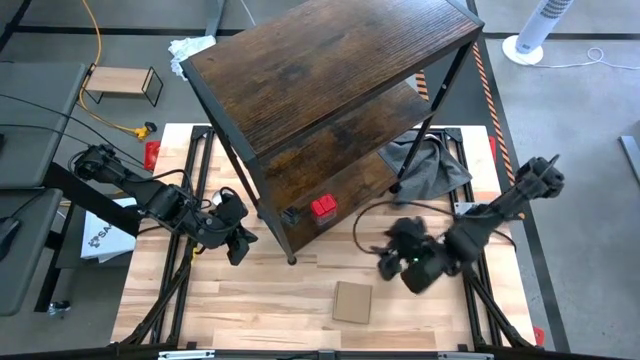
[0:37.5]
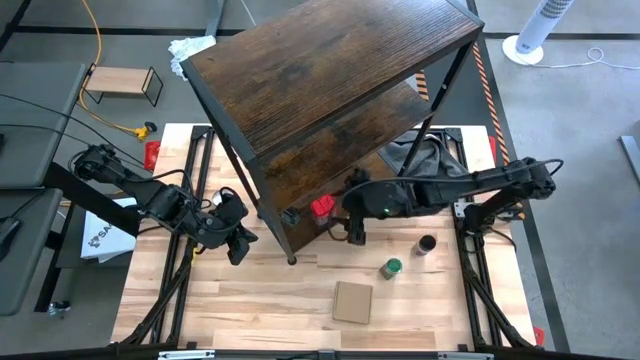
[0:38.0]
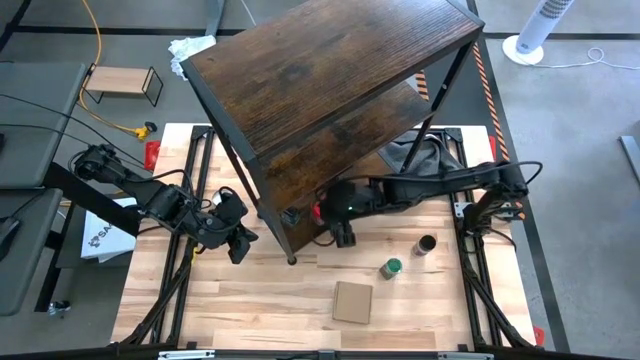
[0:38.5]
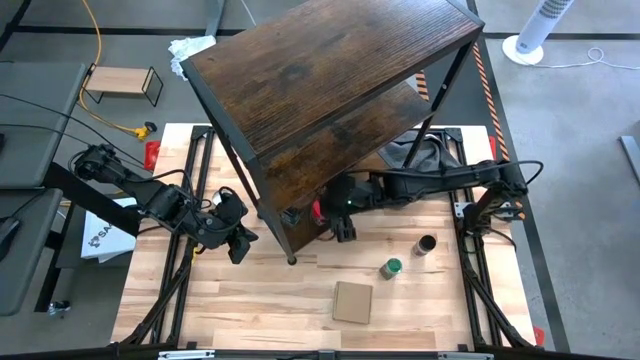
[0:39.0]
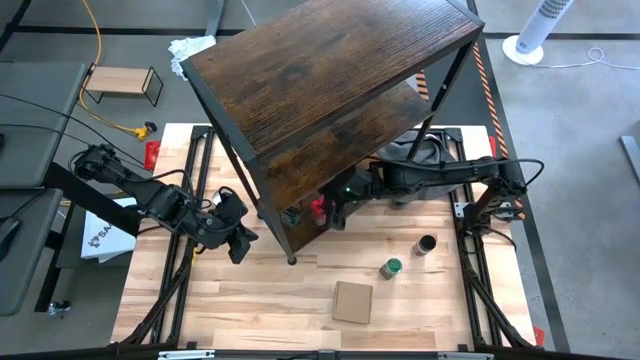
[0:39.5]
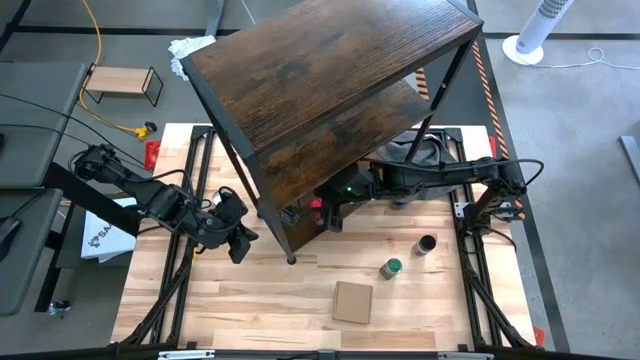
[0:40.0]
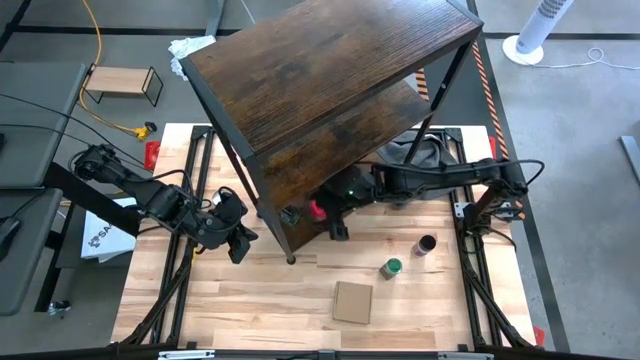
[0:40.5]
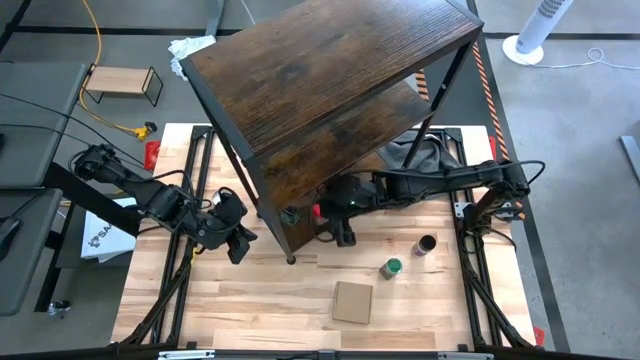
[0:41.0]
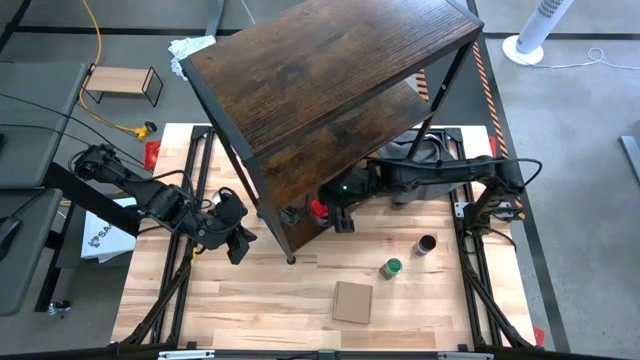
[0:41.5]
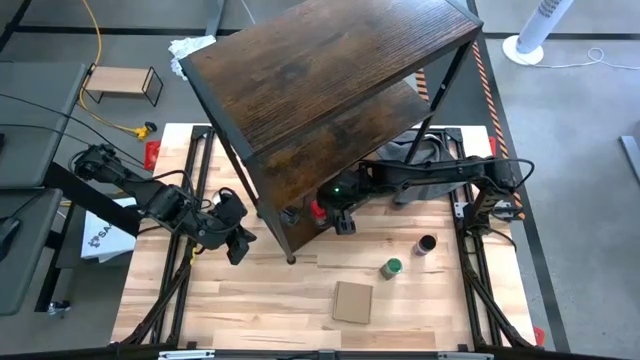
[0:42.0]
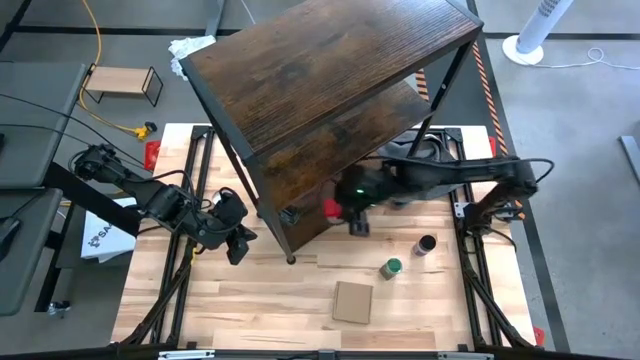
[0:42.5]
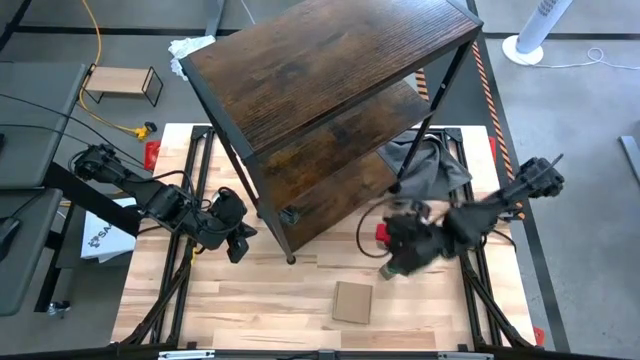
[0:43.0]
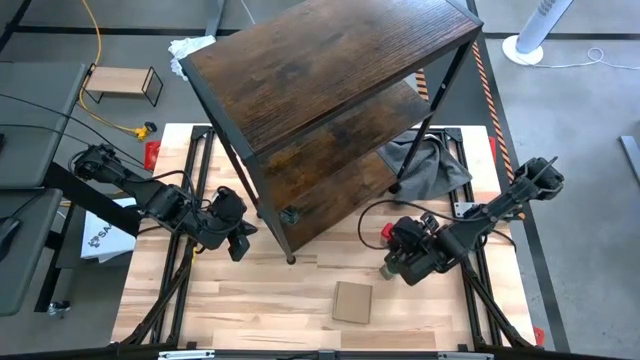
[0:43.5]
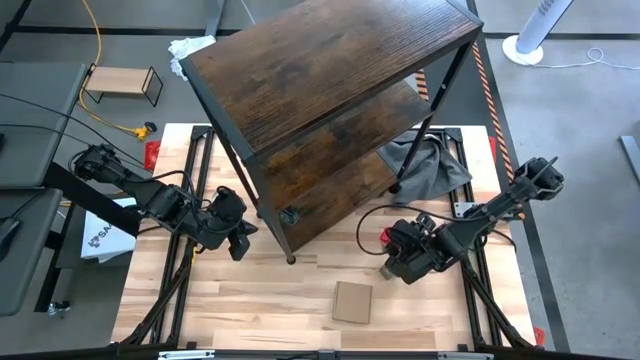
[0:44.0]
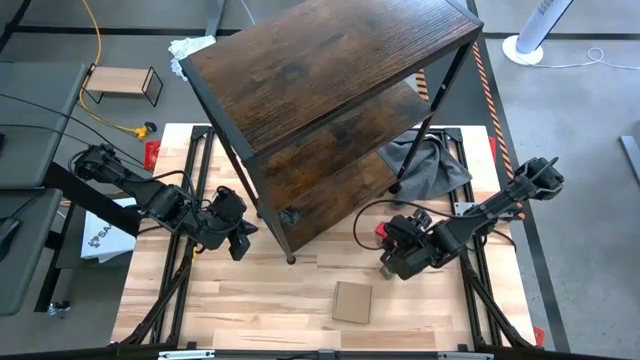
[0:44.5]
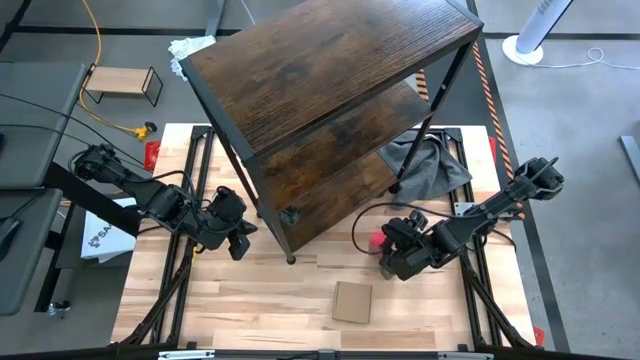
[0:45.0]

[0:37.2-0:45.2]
Task: Shelf spices
Remove the red seasoning can from the shelf

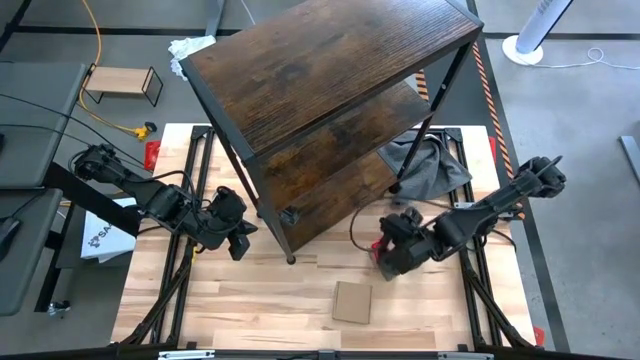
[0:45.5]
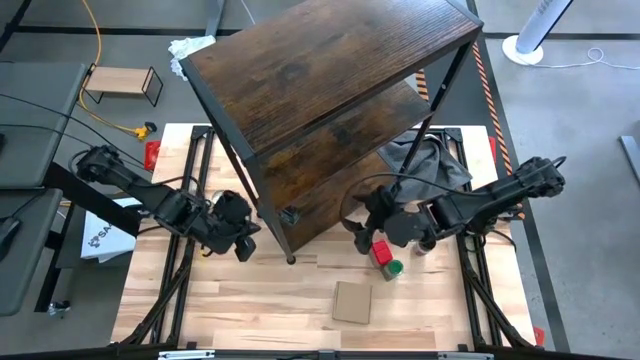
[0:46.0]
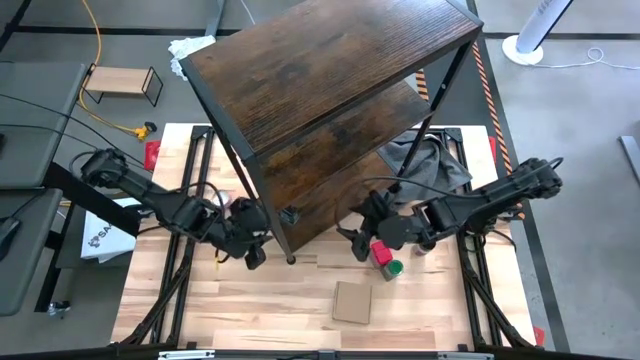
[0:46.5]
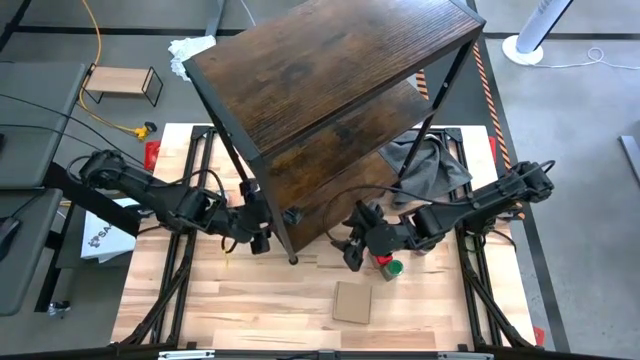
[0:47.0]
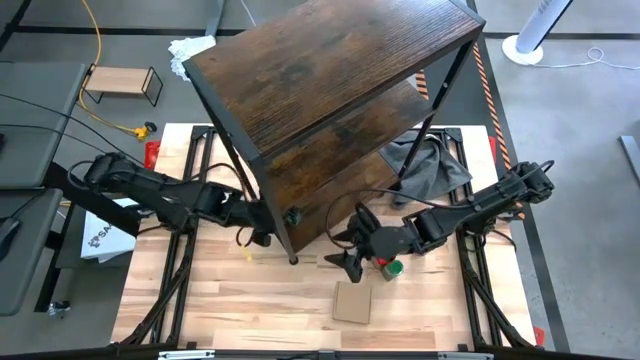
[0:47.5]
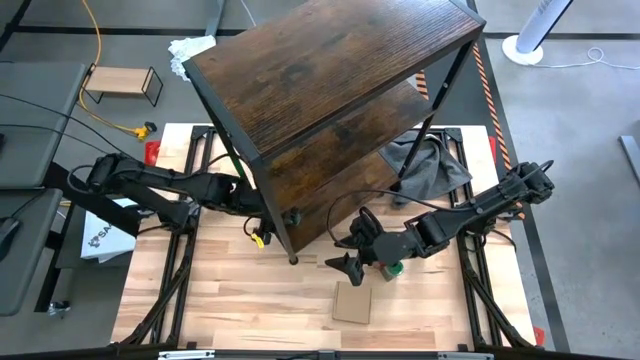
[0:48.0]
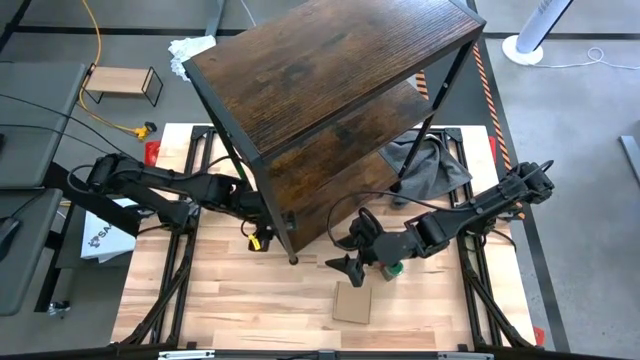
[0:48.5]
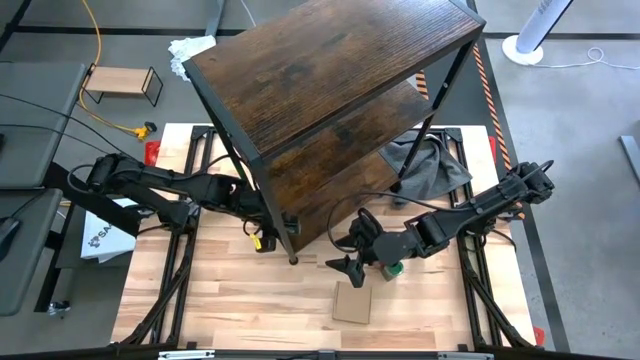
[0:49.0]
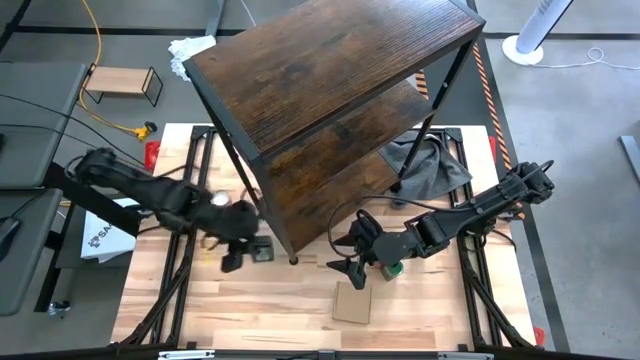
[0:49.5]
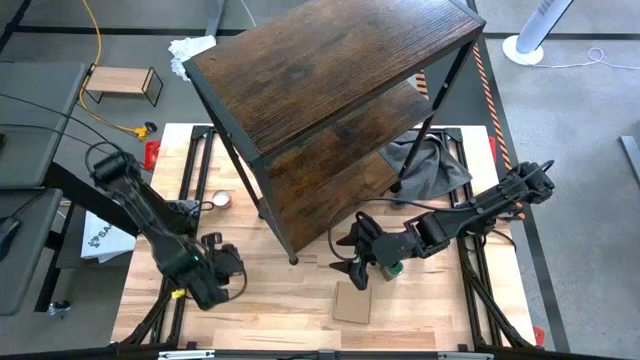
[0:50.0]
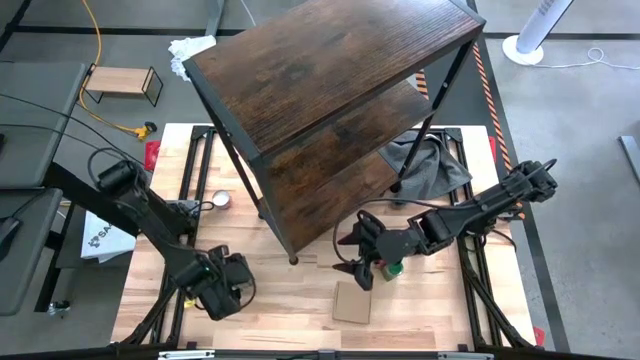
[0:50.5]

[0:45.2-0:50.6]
Remove the black seasoning can from the shelf

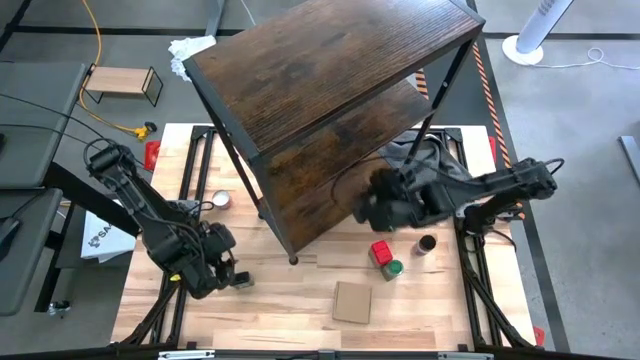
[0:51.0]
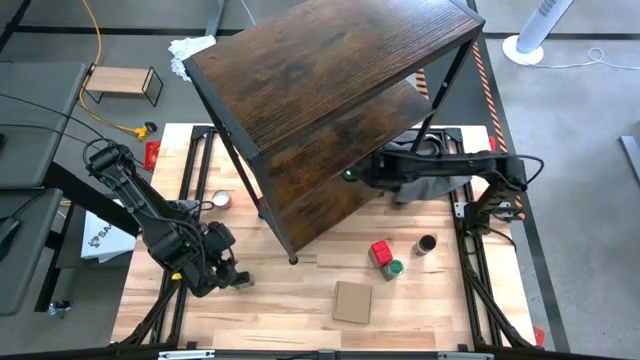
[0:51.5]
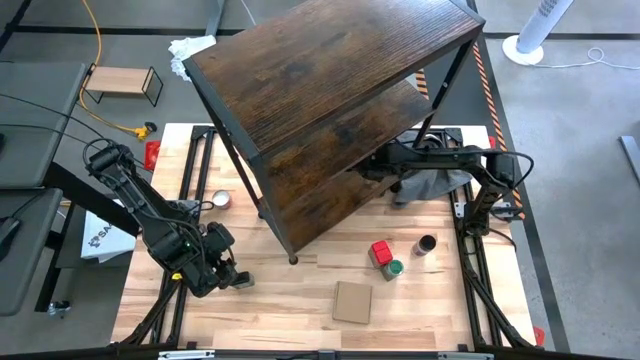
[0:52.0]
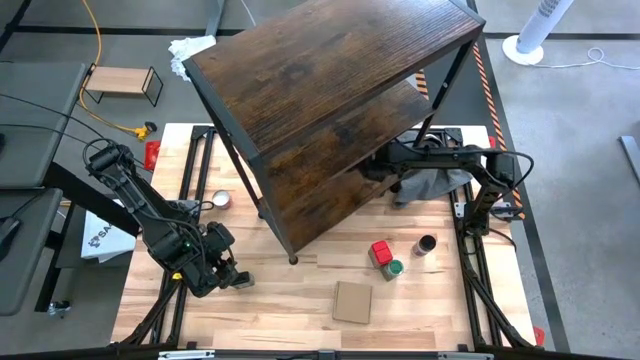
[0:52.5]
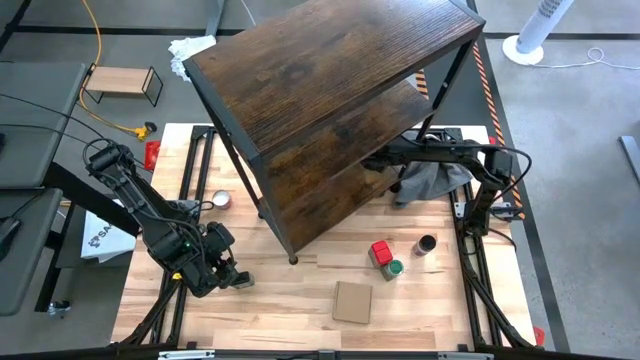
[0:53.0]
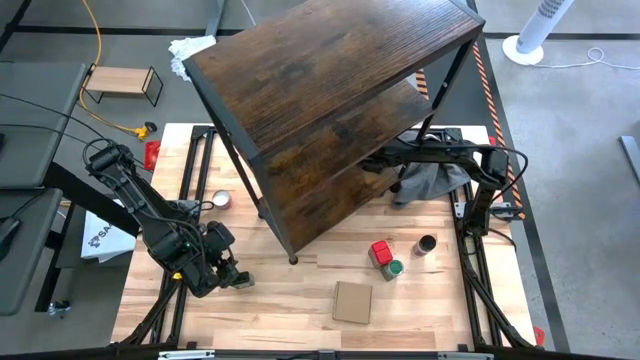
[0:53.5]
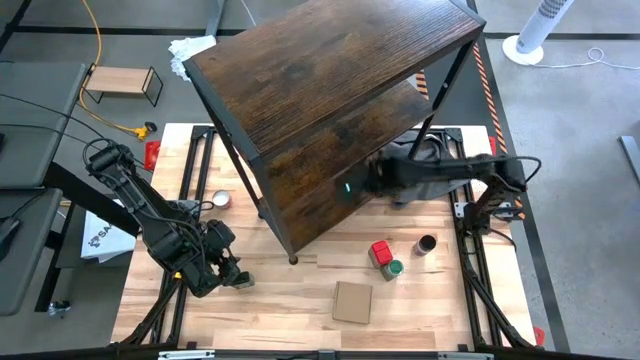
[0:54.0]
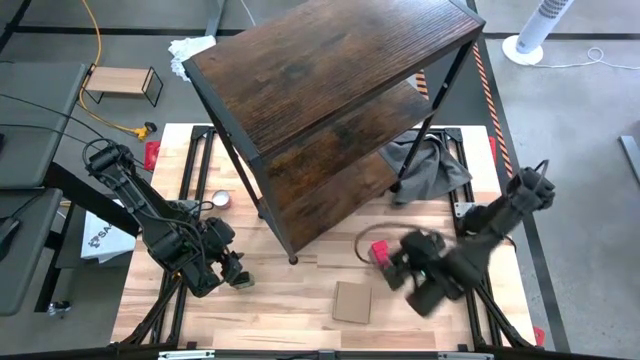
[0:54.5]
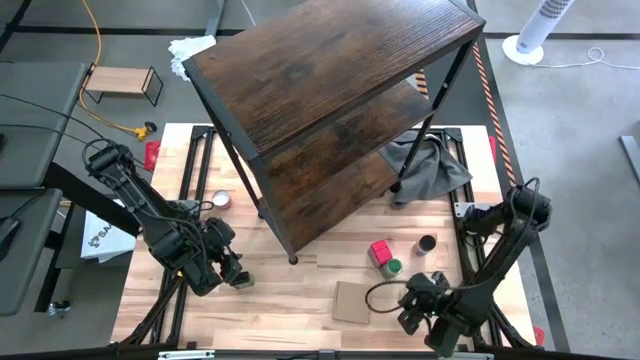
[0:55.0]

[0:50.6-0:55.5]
Remove the brown seasoning bottle from the shelf

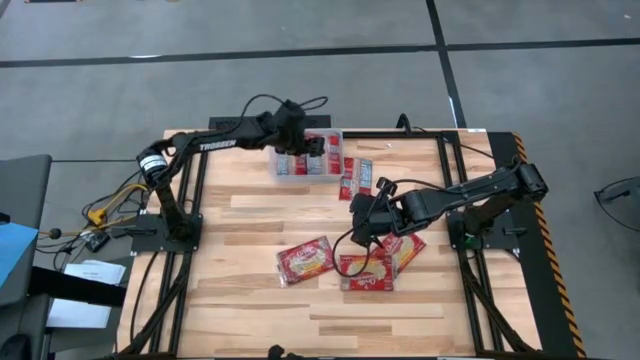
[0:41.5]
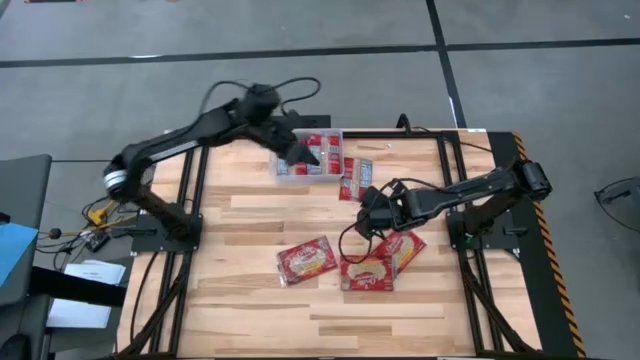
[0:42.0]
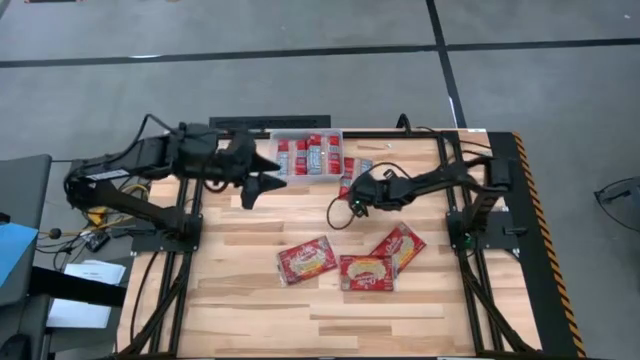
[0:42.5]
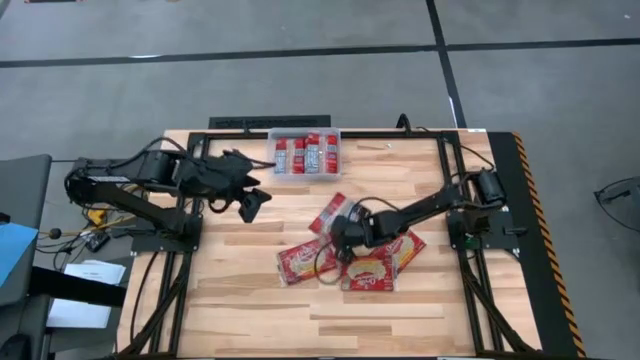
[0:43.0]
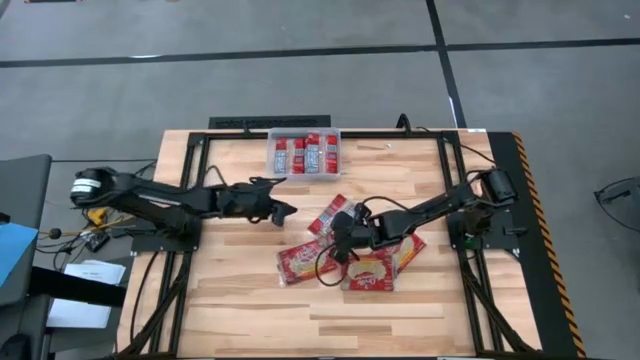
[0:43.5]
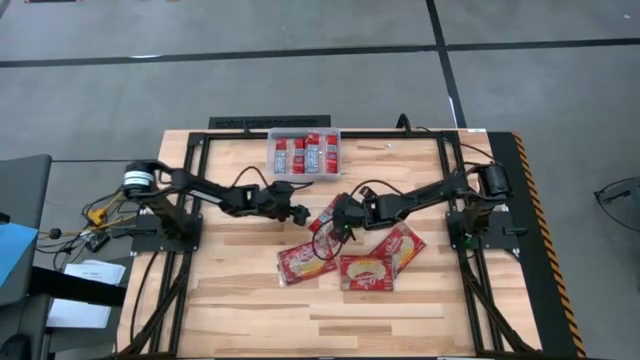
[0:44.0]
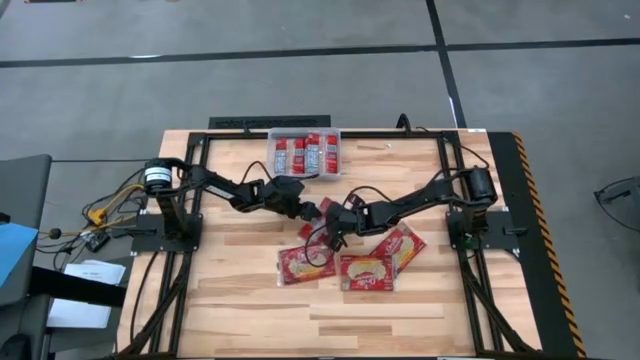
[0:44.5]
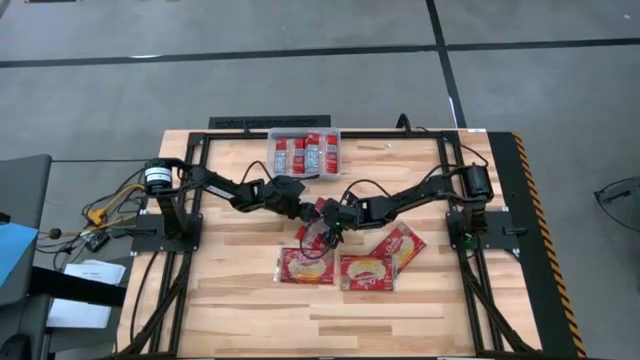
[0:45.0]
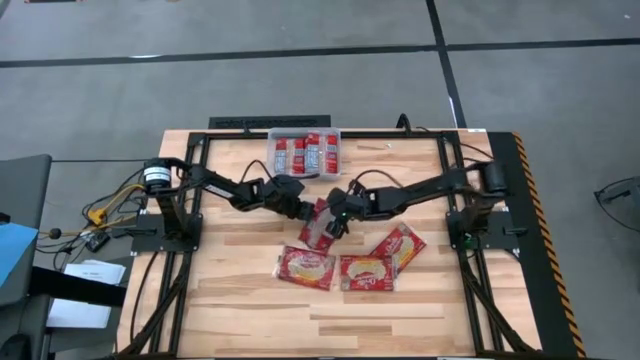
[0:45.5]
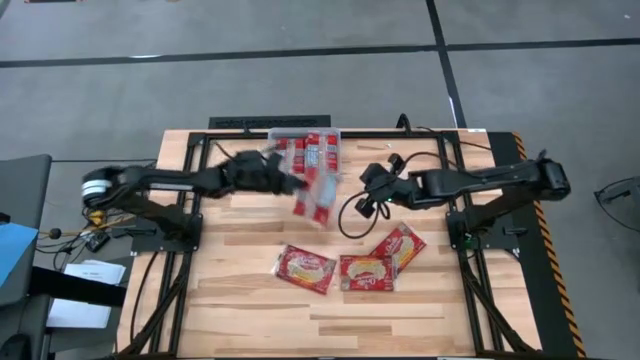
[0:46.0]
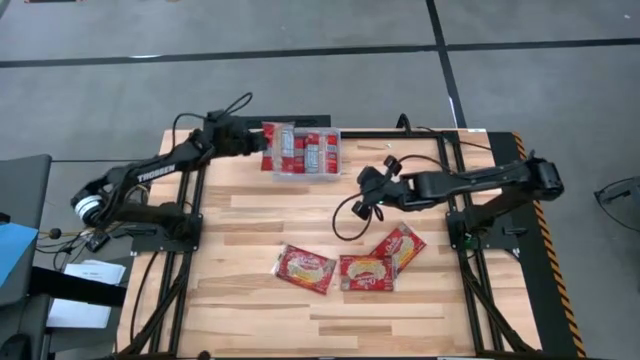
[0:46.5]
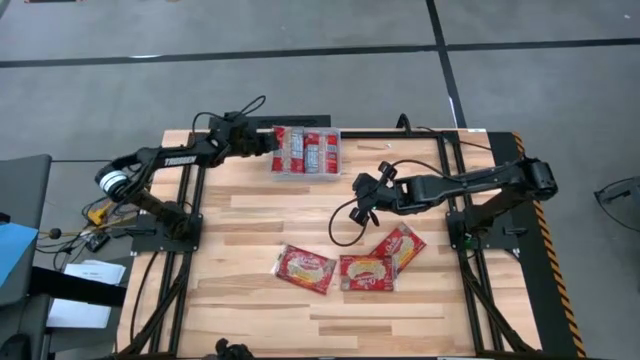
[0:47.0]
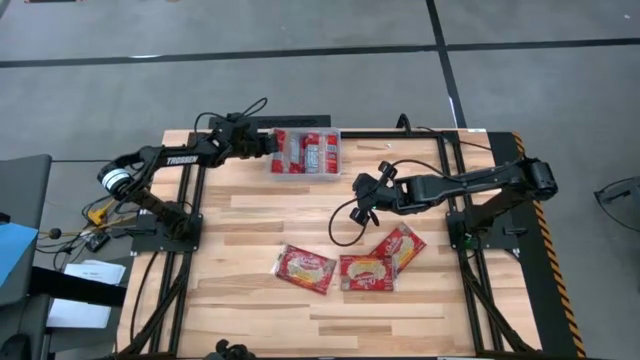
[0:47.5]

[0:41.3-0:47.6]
Task: Sort popcorn bags into baskets
Put the red popcorn bag into the transparent bin
